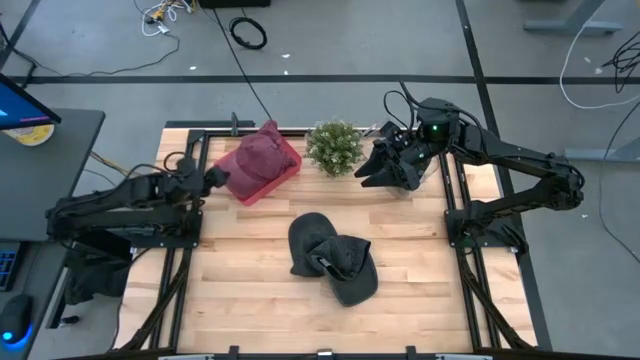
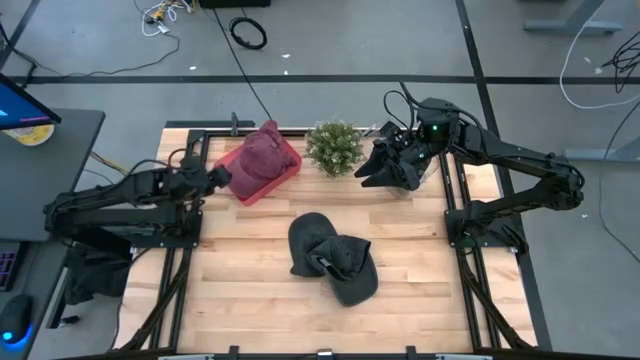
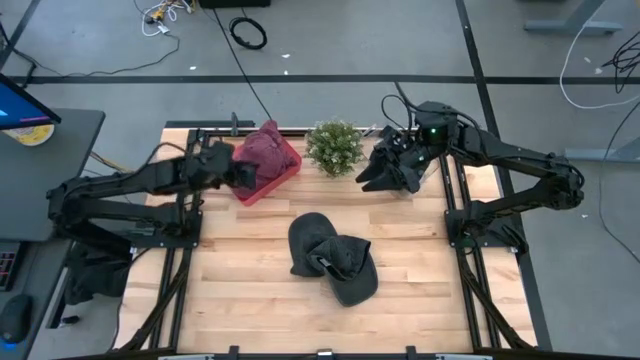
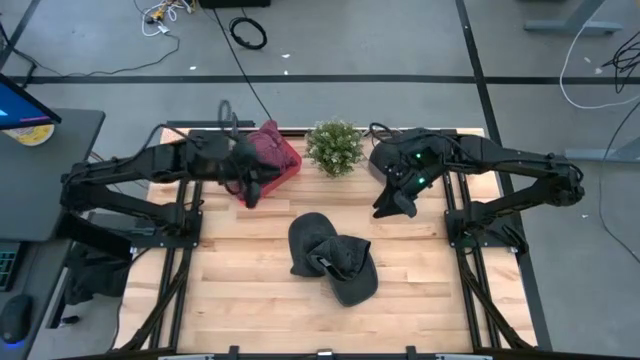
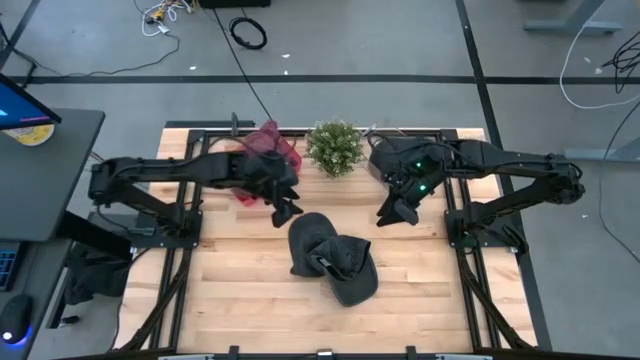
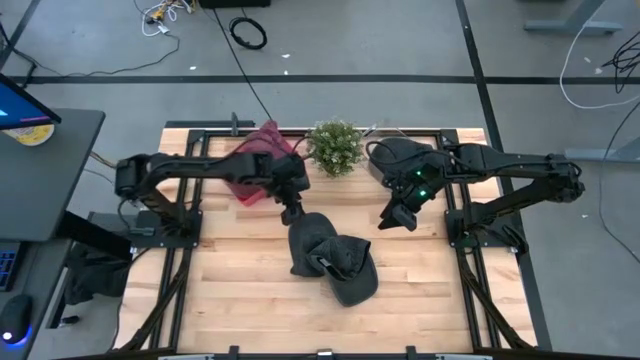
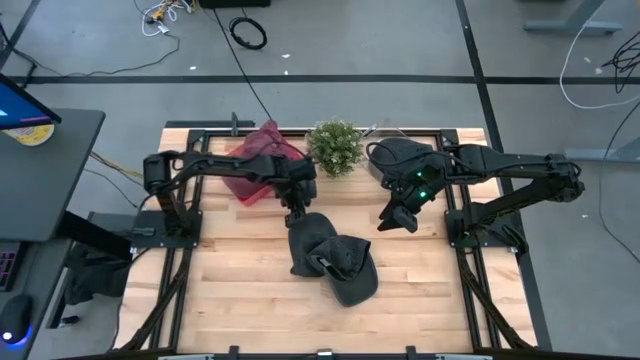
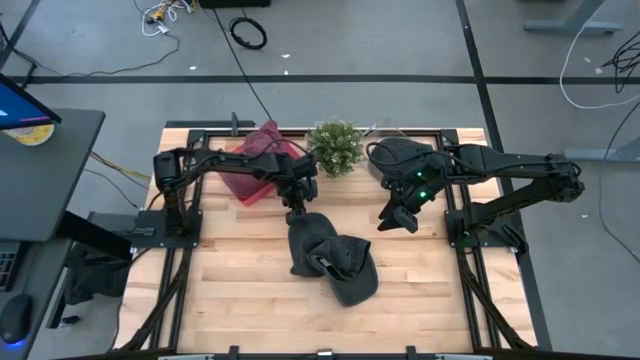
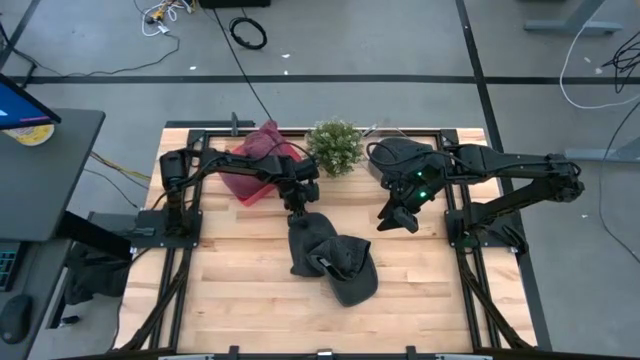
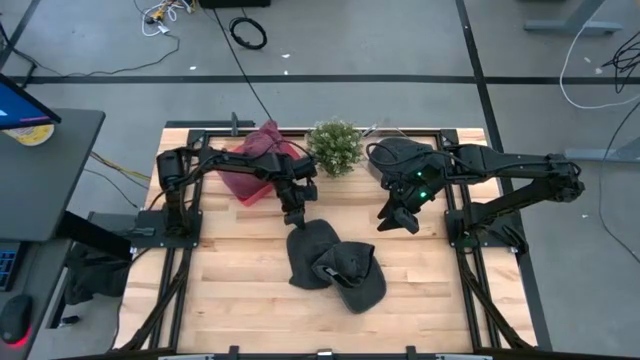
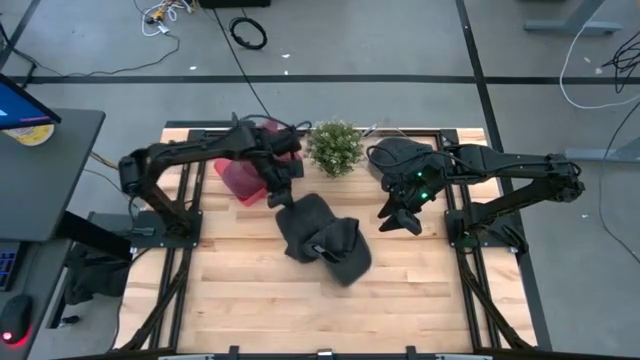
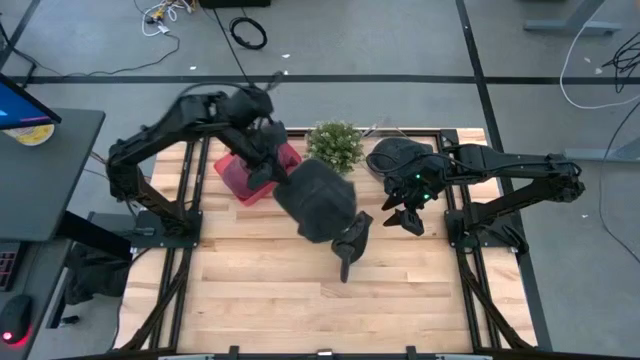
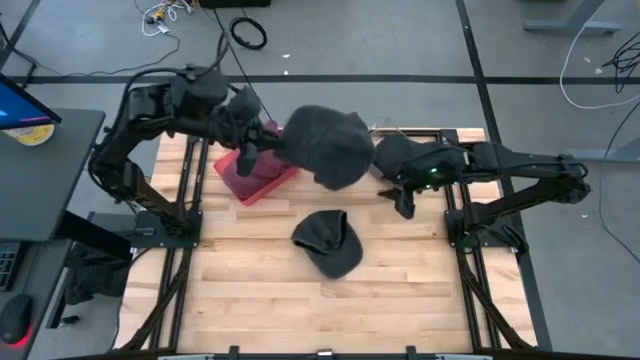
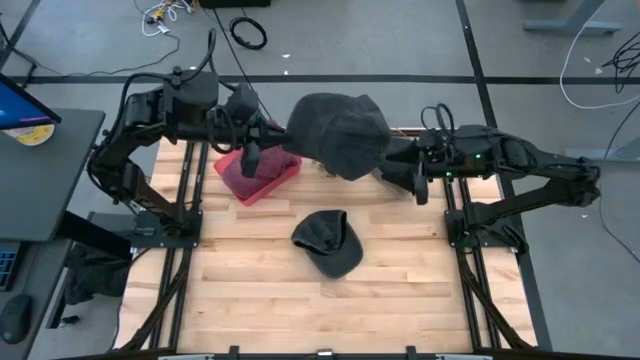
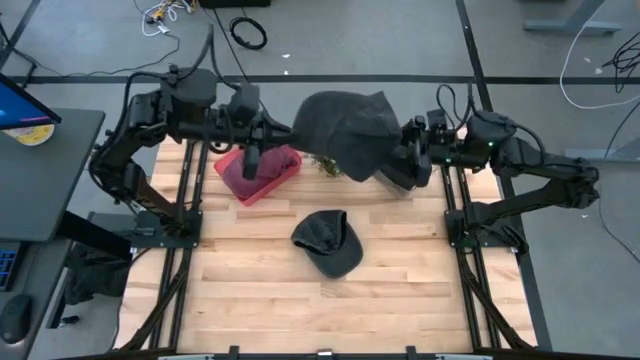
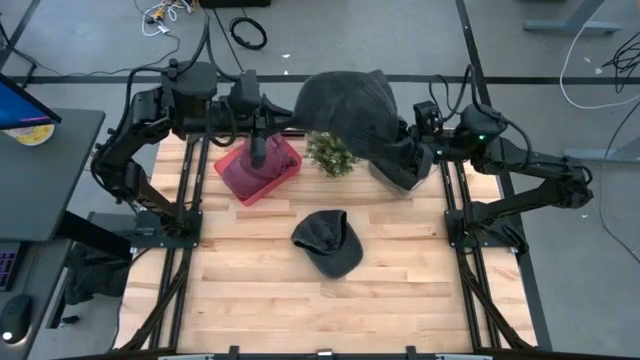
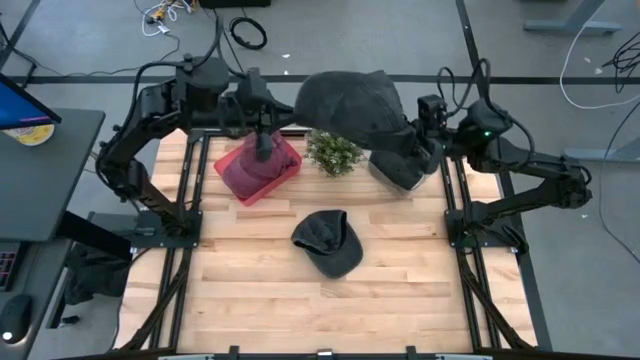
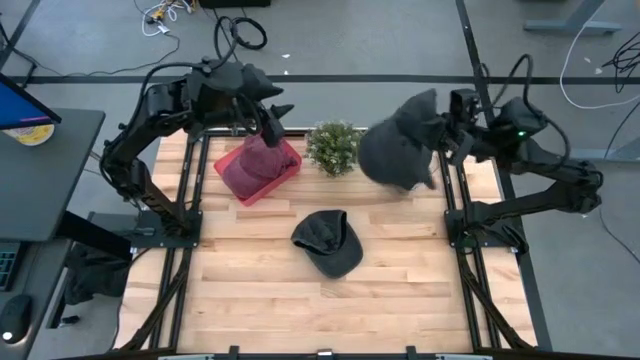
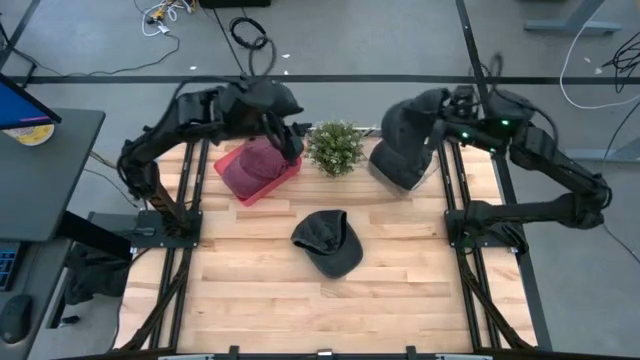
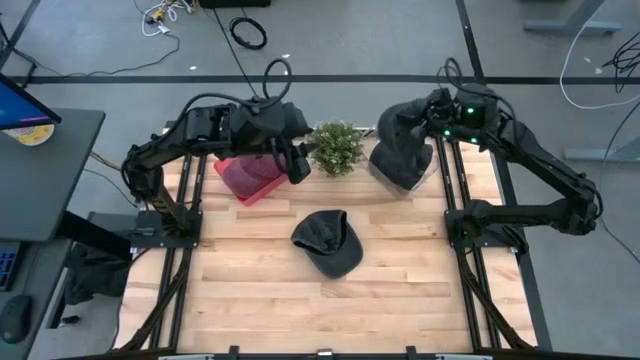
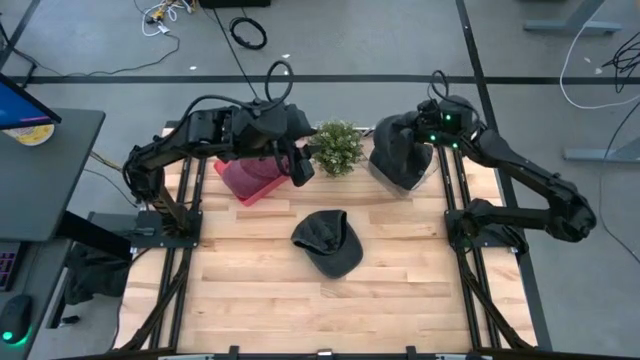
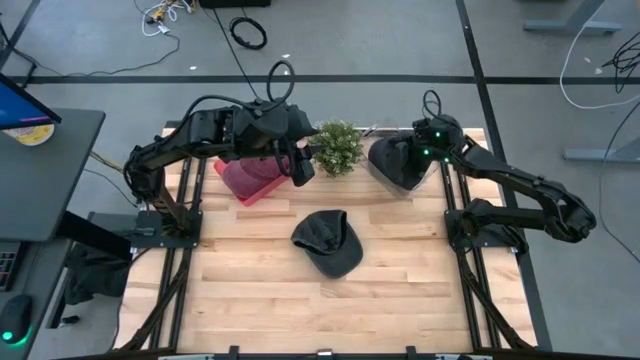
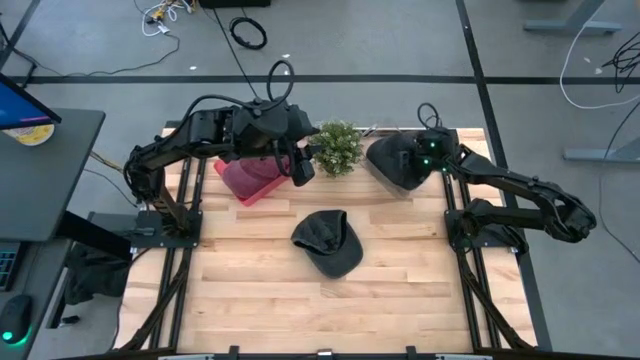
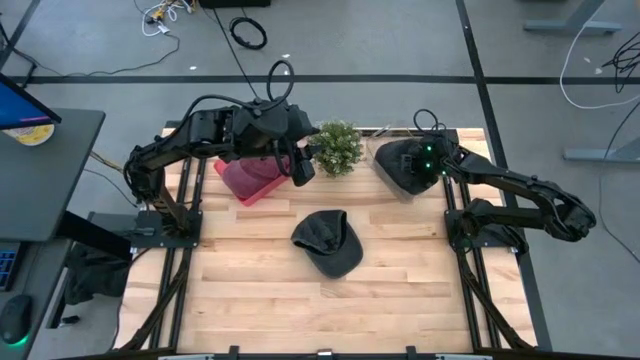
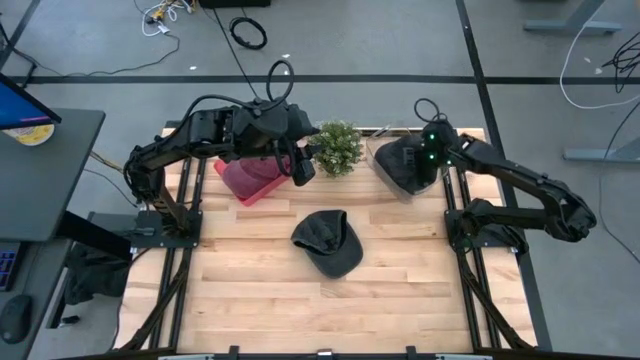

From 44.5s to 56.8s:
Task: Pick & Place hat
Put the top black cap into the transparent bin

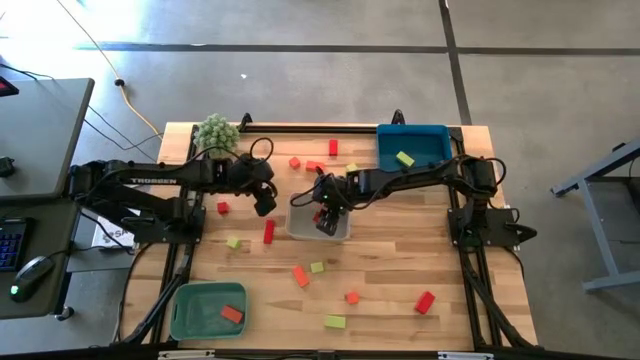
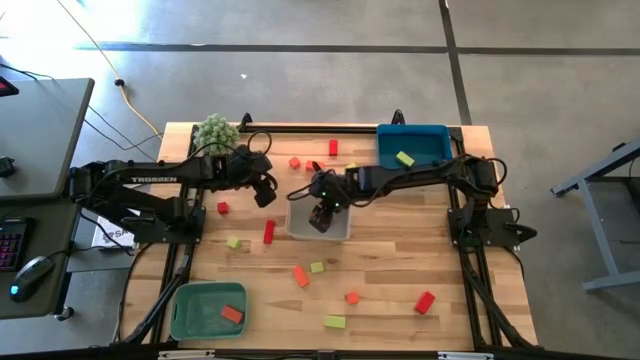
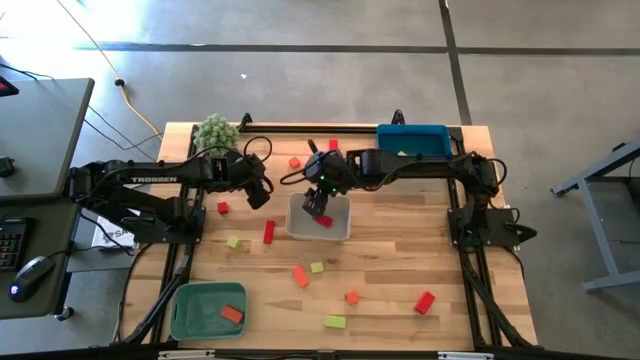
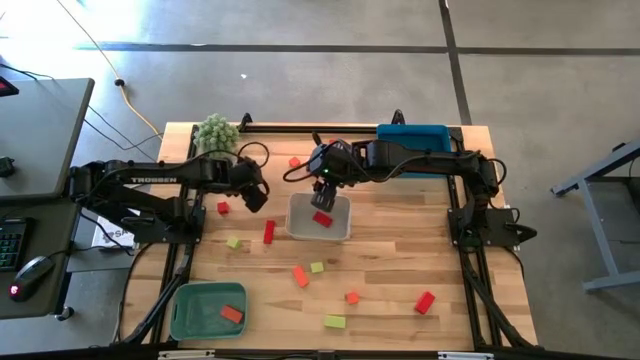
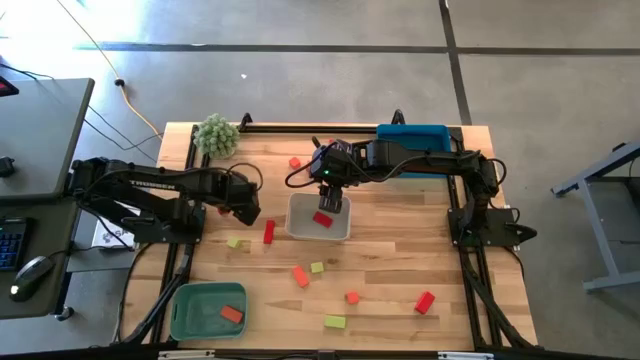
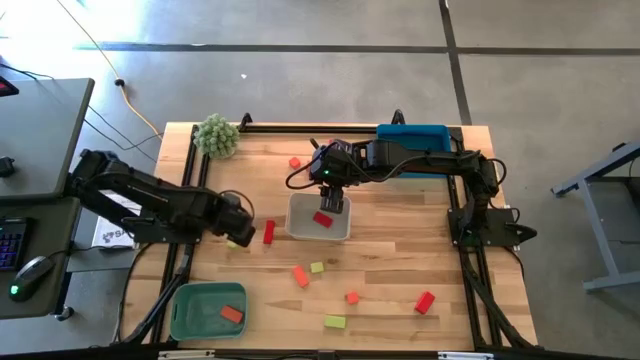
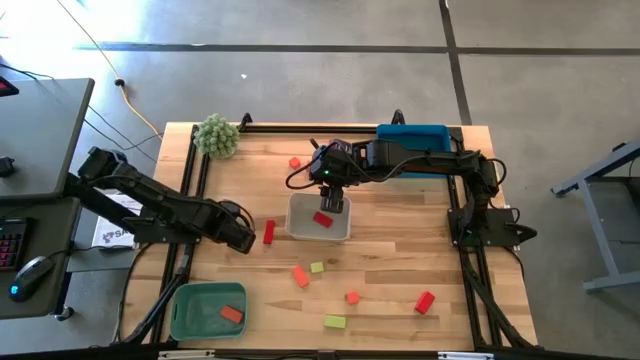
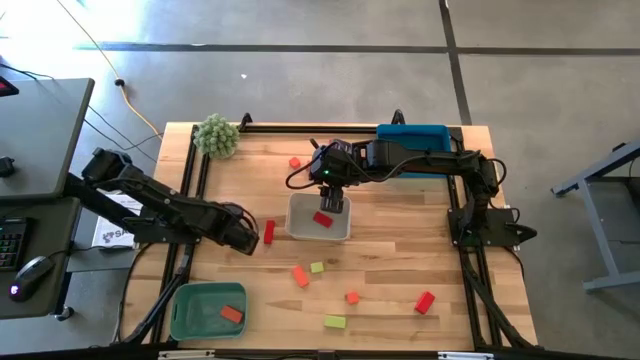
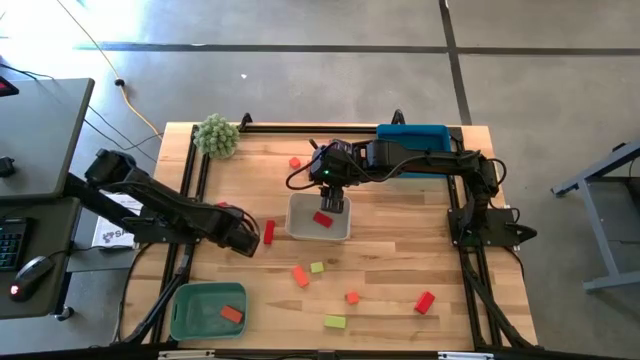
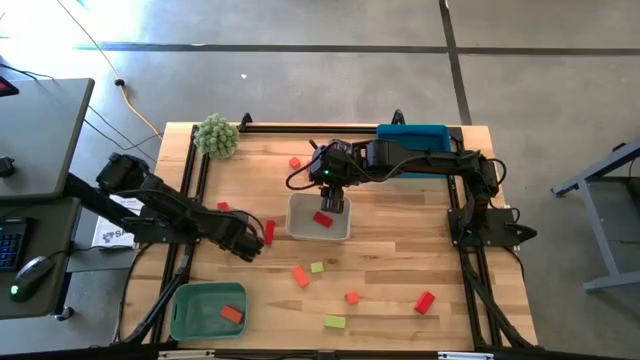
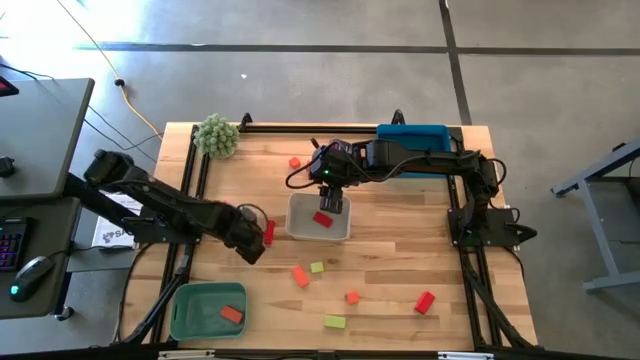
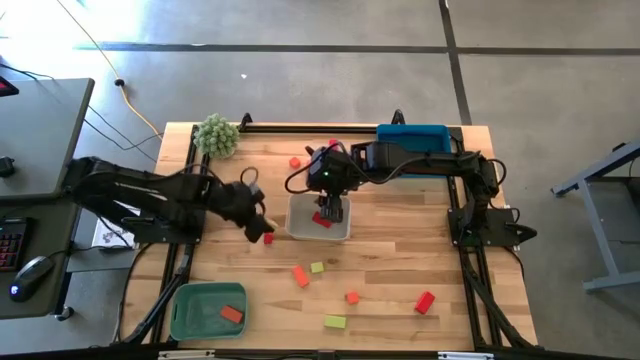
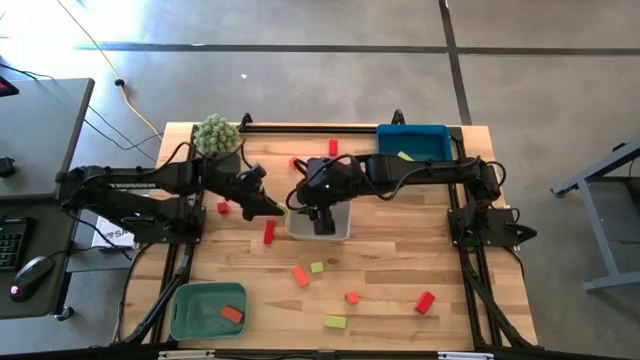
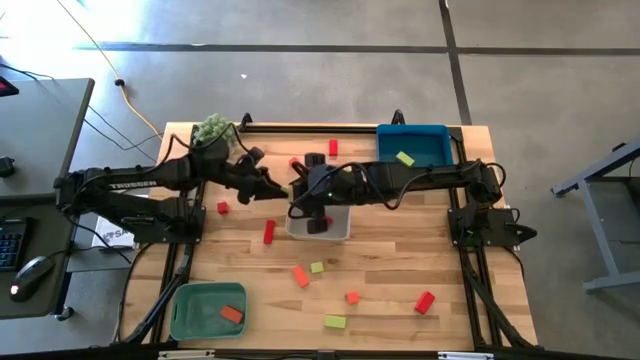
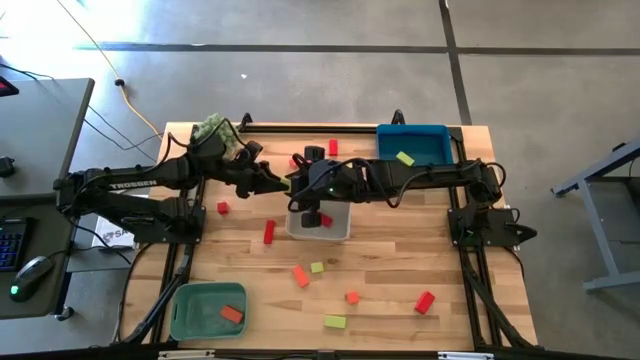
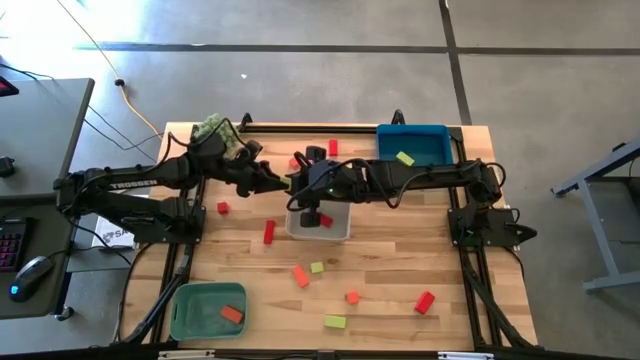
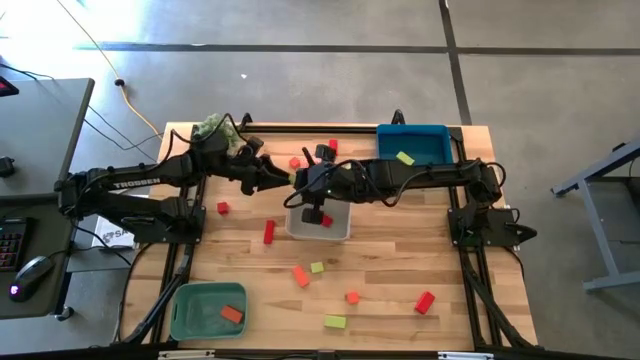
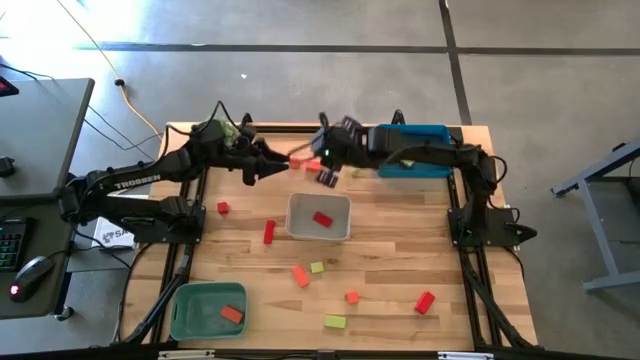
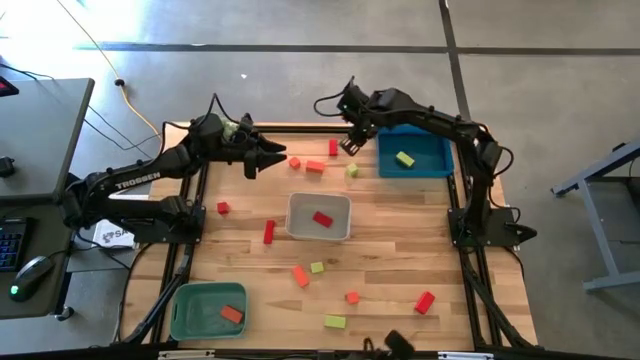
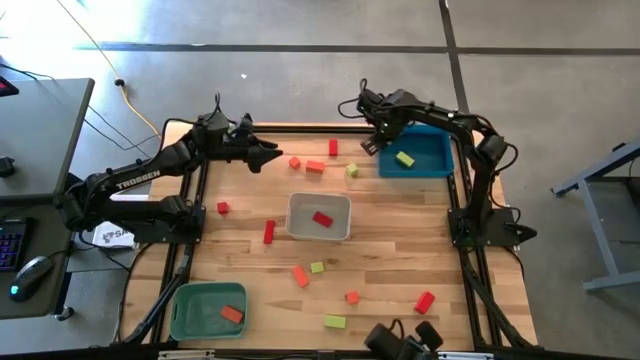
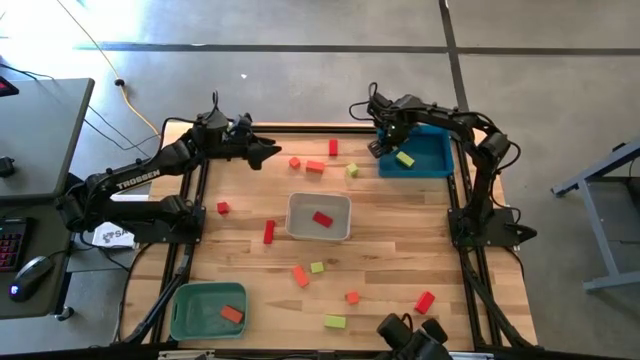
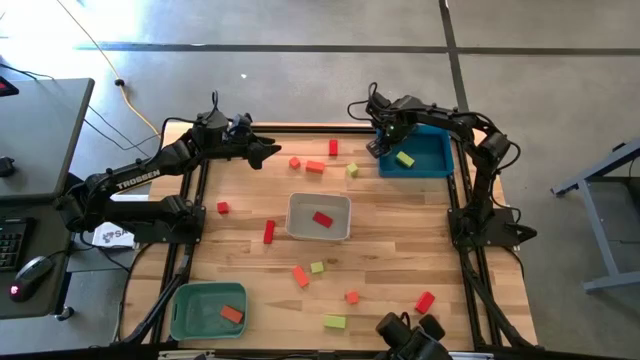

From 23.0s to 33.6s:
Task: Sort & place blocks by color
Put the green wooden block into the blue bin
